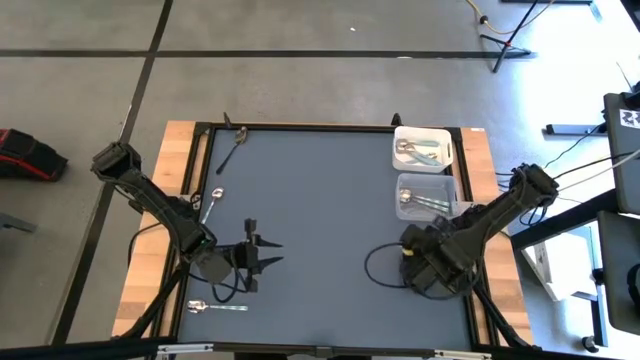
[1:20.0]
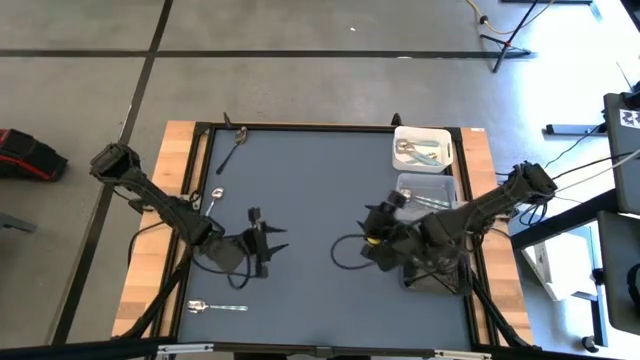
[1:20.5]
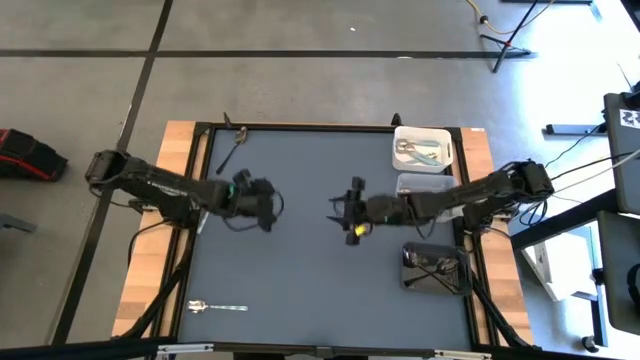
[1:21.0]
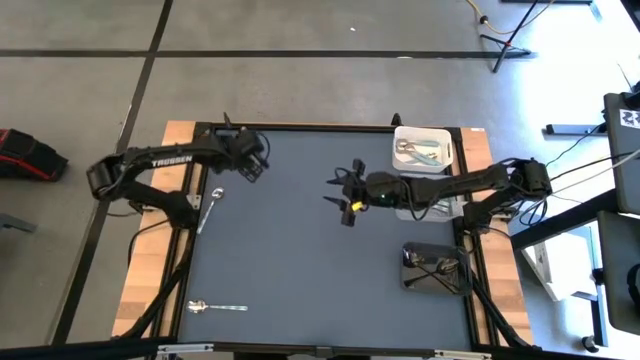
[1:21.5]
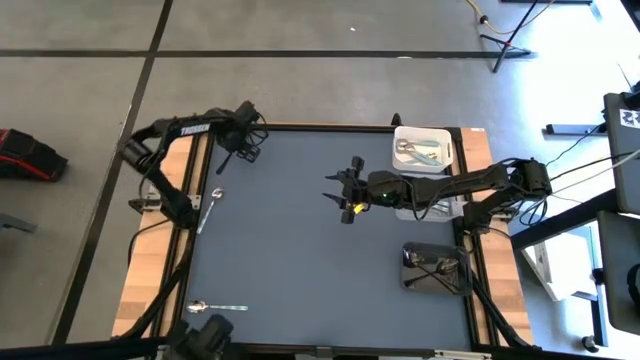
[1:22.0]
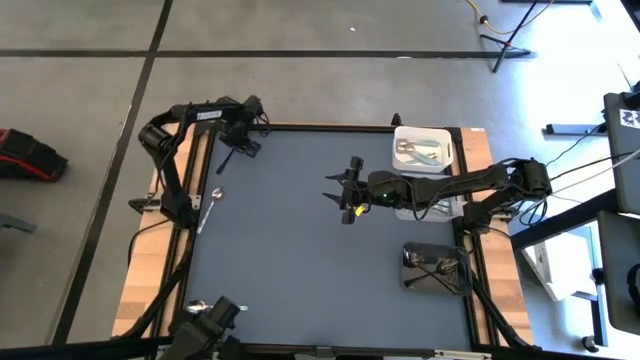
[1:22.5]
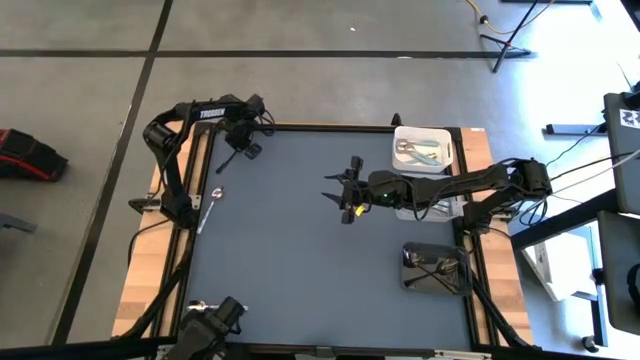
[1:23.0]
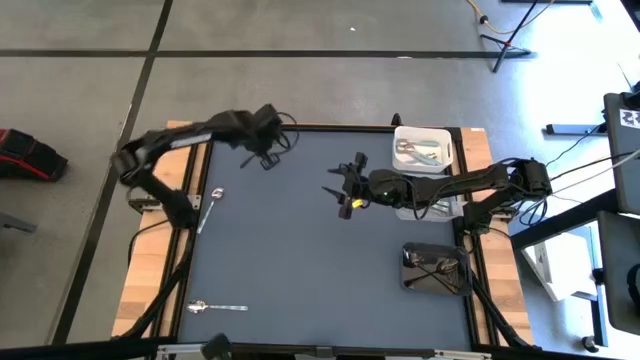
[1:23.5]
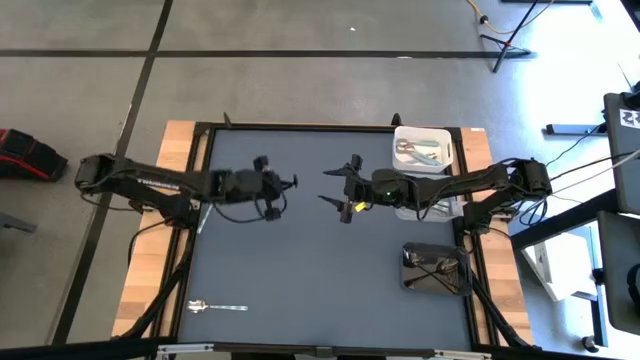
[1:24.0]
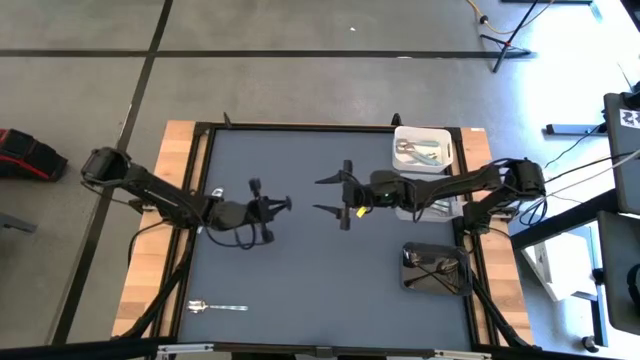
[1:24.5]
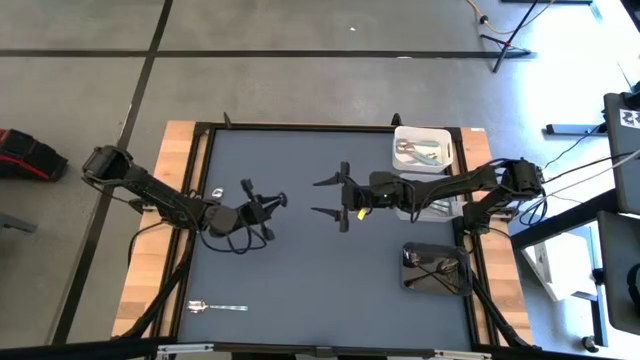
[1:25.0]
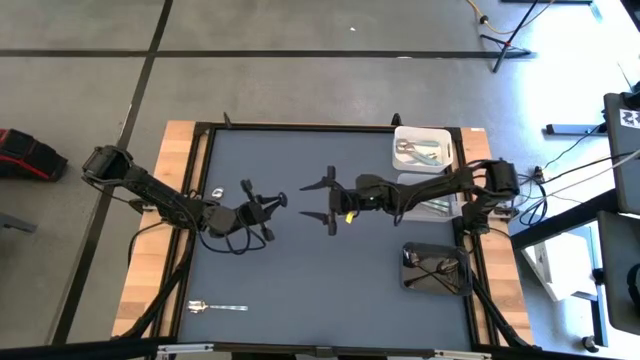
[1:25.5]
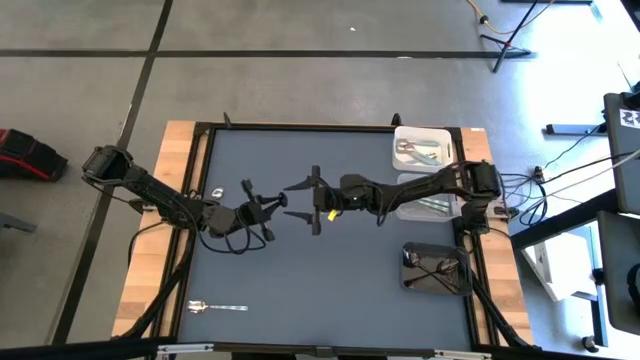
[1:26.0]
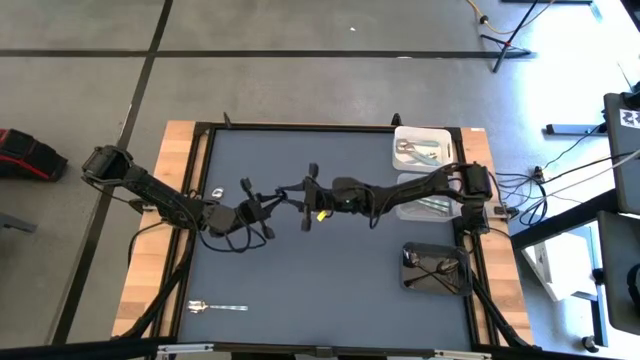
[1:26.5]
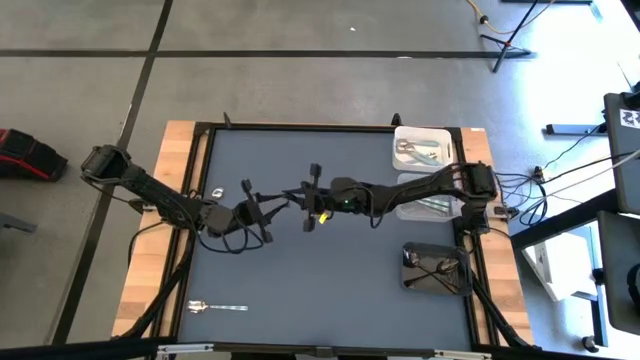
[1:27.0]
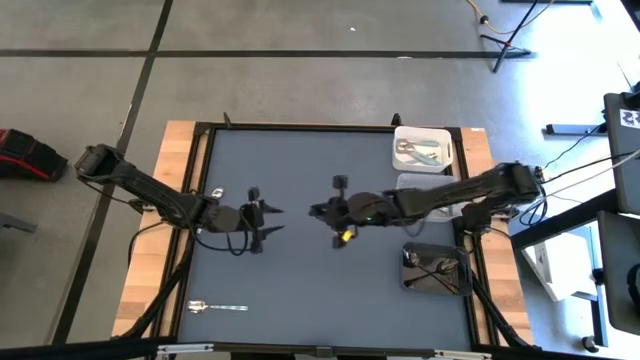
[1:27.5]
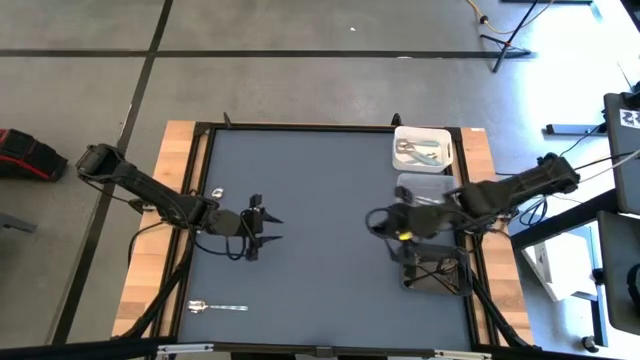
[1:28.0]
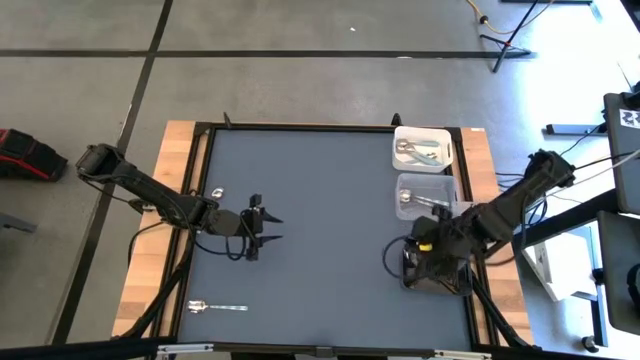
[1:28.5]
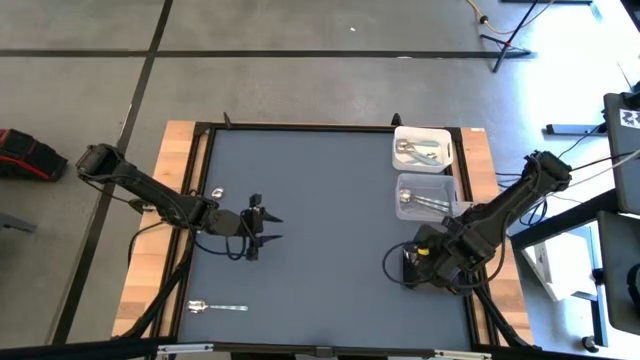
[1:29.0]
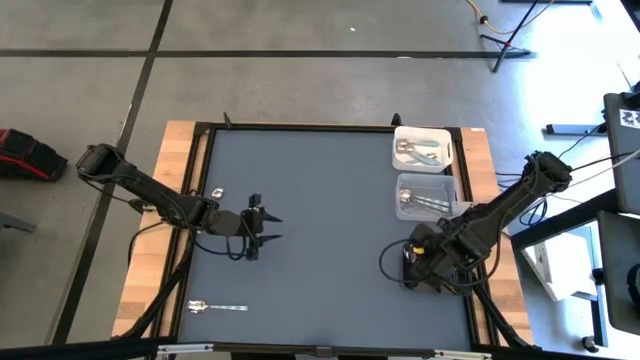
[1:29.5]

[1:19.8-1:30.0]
Task: Sort silverware by color (type)
Put the black spoon into the black bin

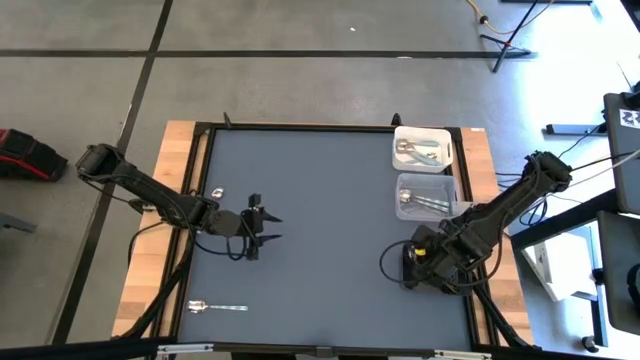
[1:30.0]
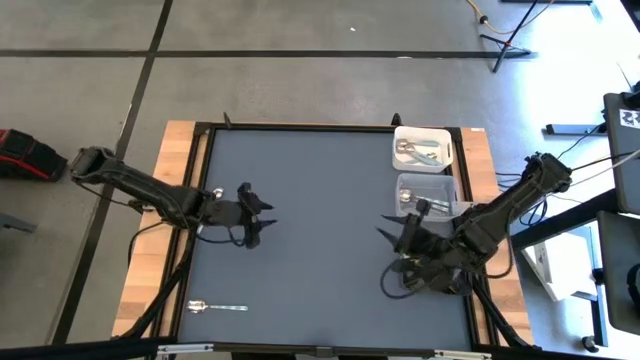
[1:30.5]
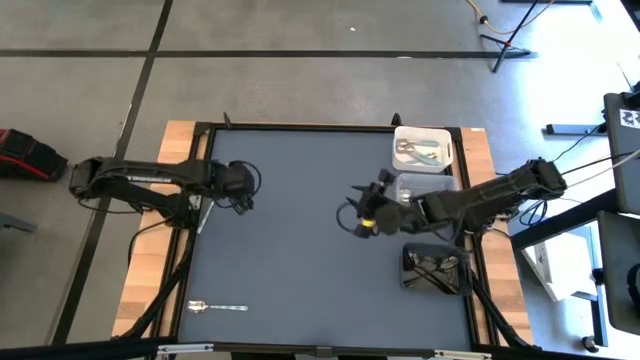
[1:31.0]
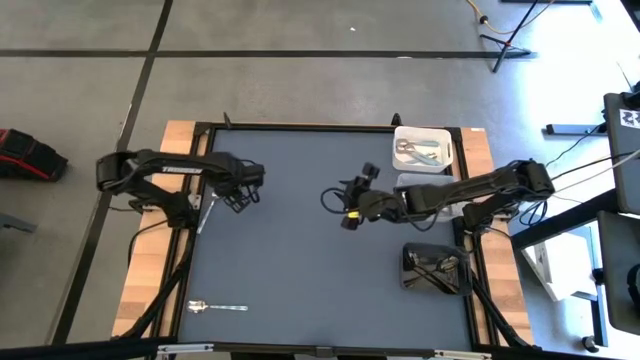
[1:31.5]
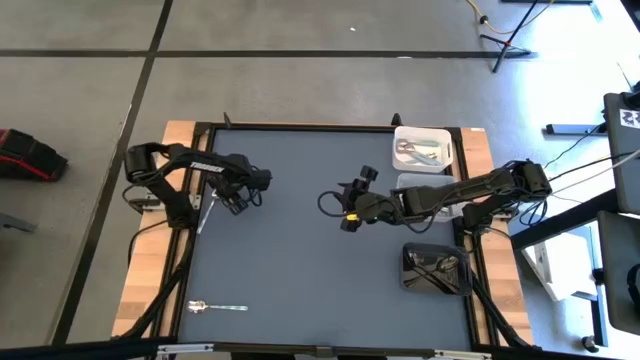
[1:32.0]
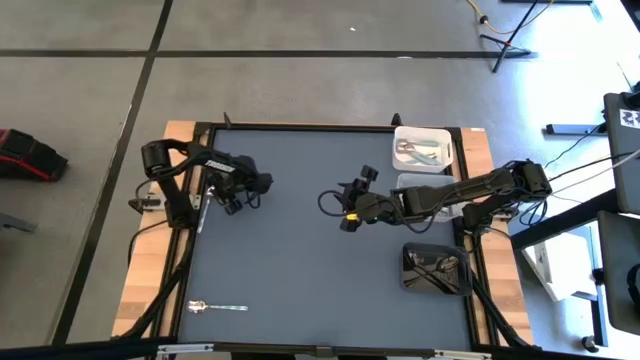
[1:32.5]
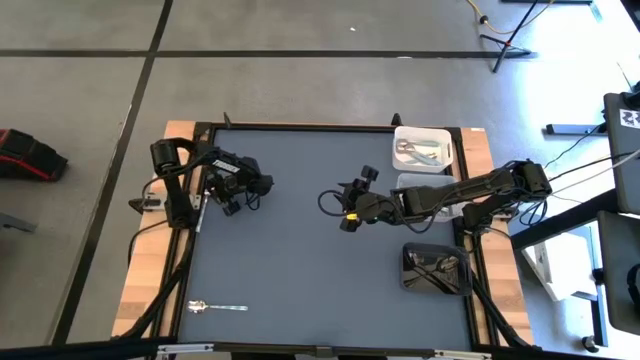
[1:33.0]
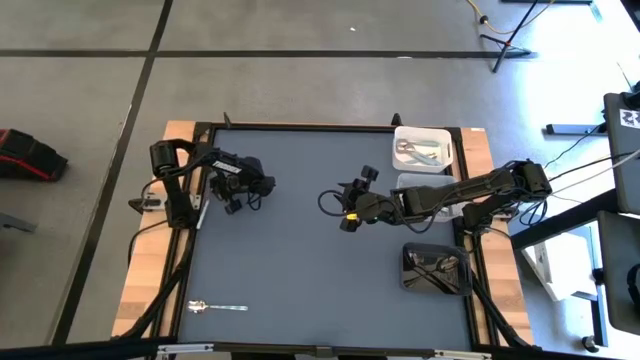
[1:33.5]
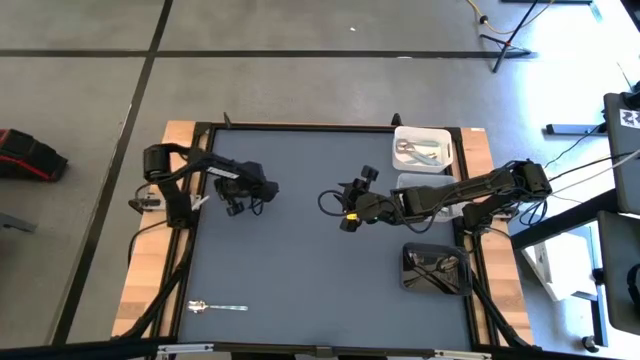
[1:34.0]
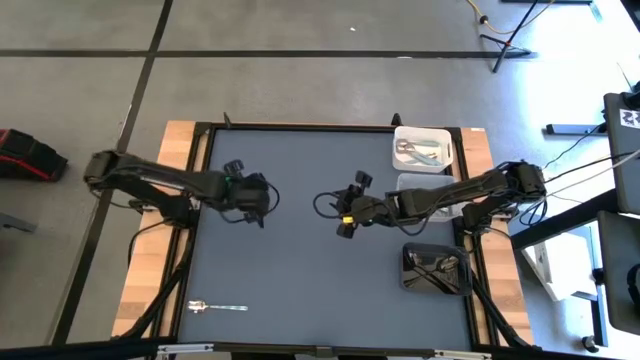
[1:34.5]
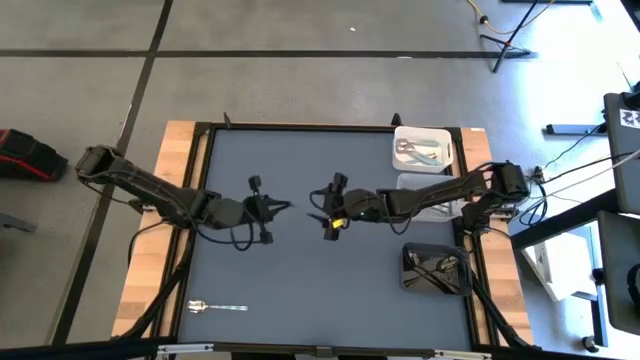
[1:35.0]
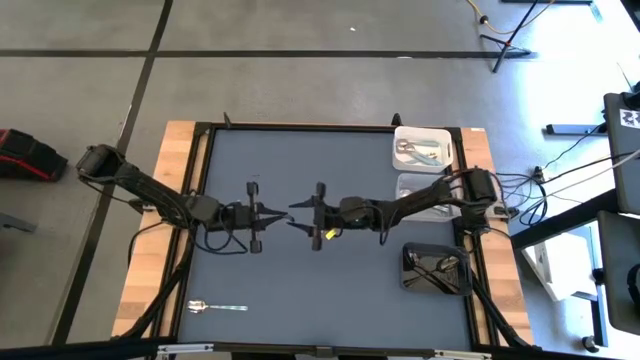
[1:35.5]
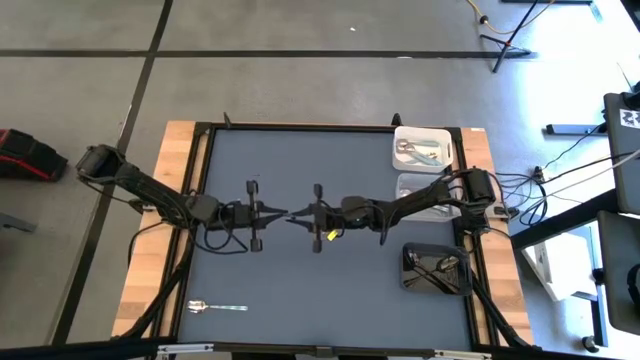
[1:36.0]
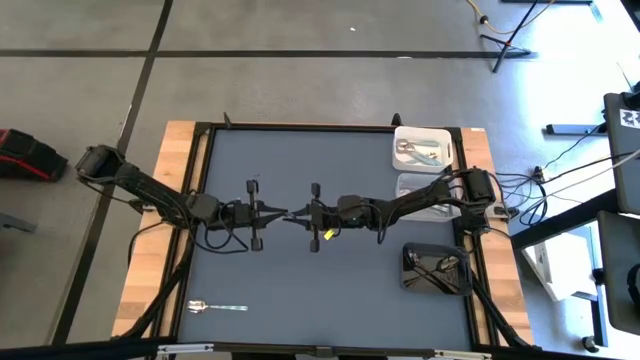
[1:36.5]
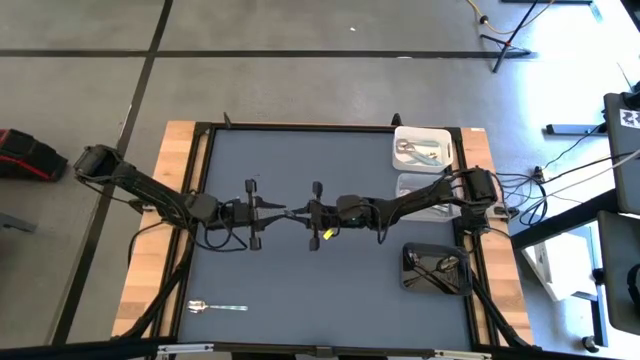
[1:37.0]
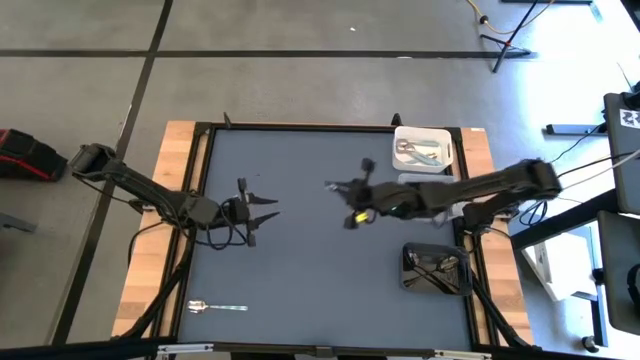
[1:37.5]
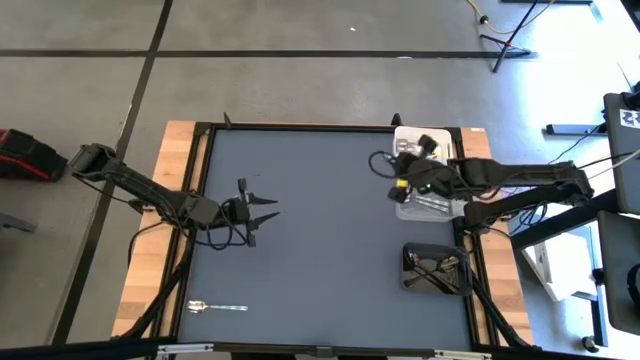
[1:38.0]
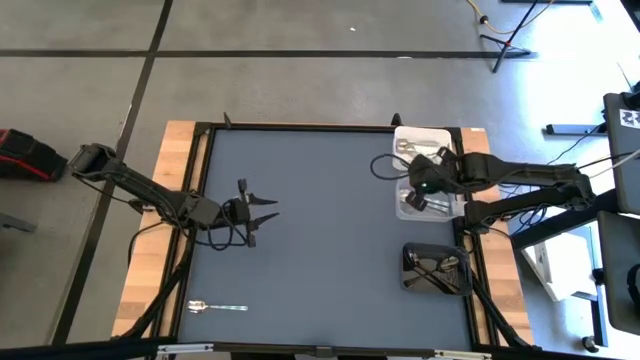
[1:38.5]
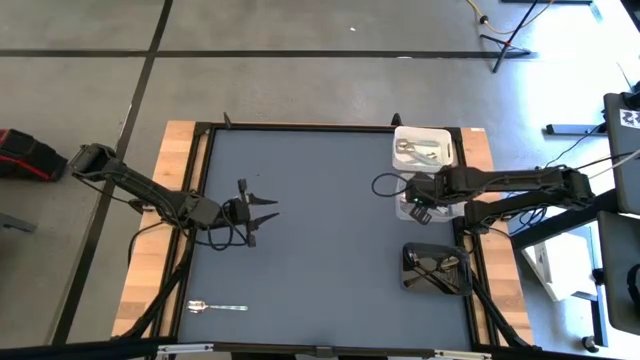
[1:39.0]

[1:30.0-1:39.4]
Put the white green spoon into the transparent bin
